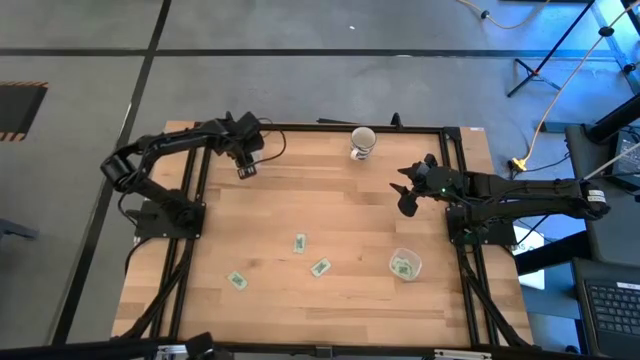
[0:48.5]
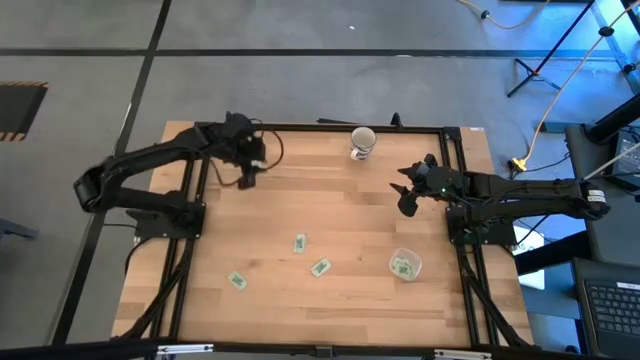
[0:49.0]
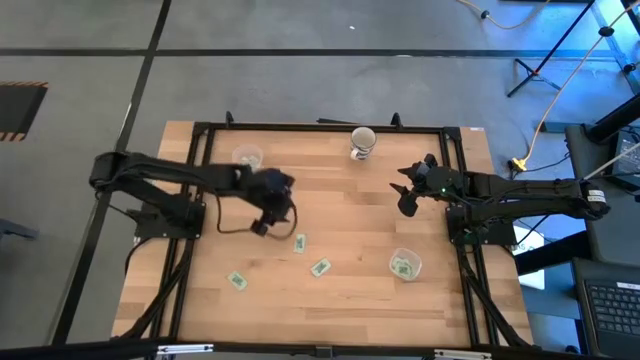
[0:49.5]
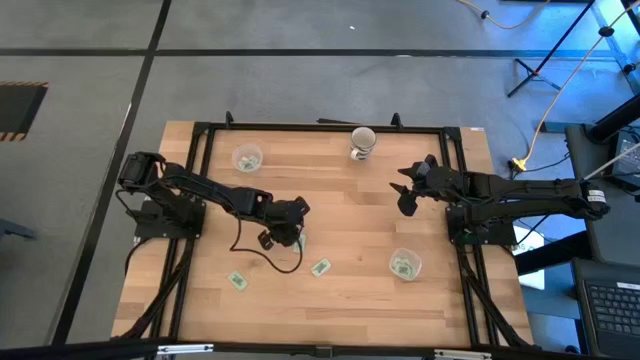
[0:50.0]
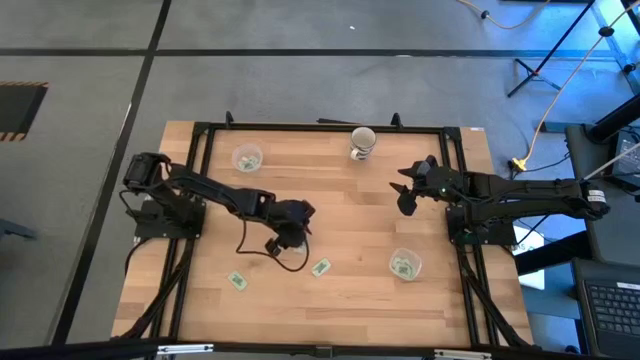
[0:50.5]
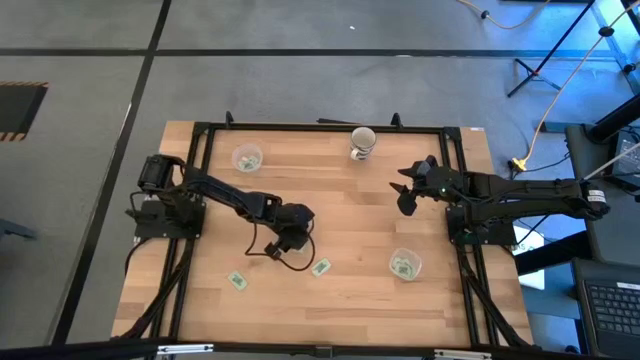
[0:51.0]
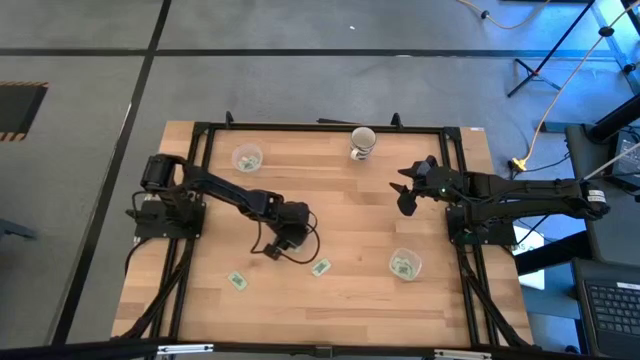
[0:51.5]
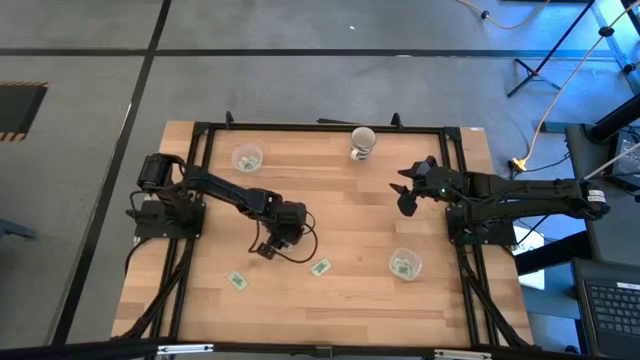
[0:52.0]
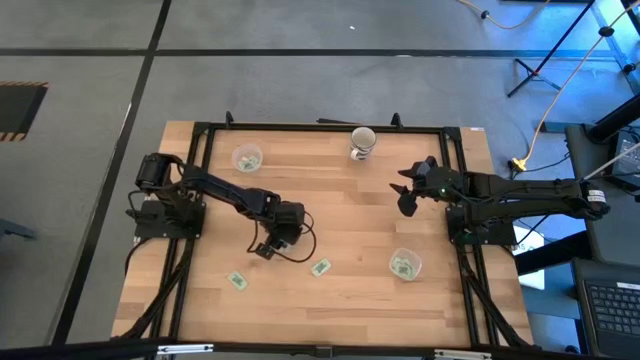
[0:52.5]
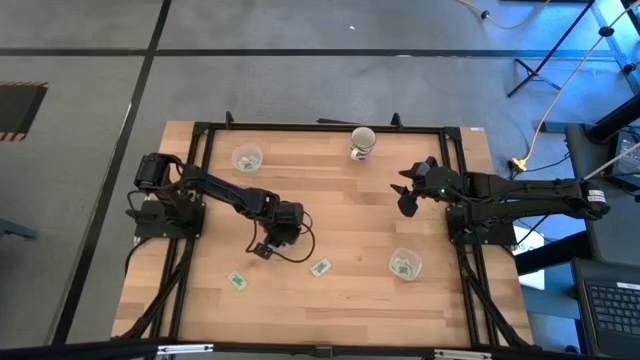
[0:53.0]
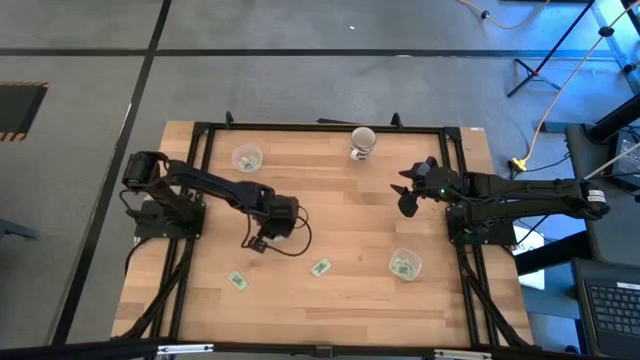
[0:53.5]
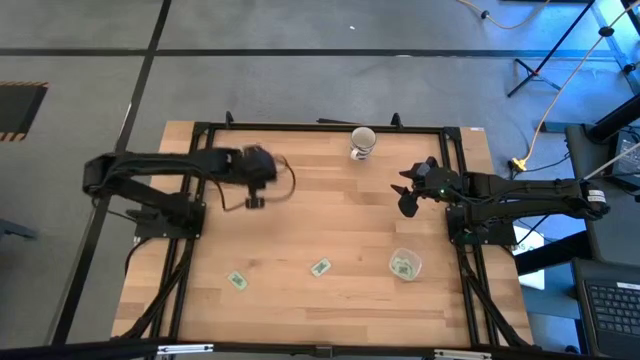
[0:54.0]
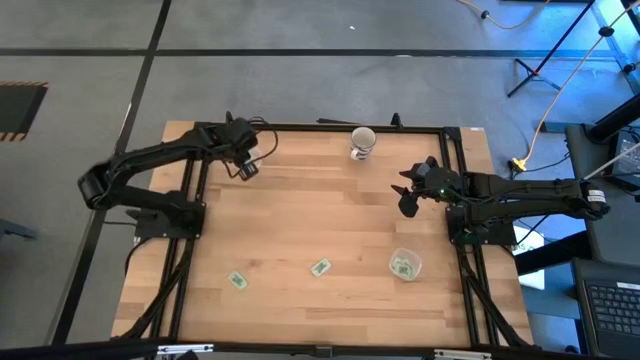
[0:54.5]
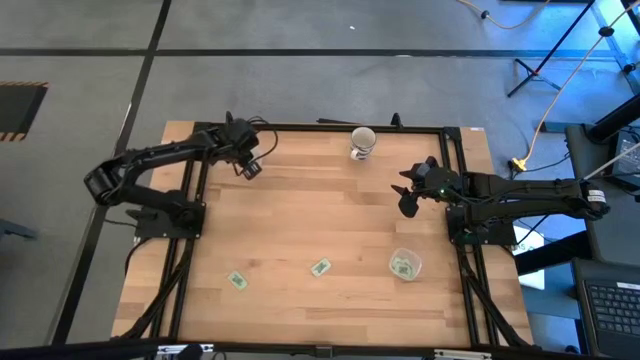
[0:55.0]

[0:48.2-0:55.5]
Task: Pick and place items into bin
Put the white stevia packet into the top transparent bin

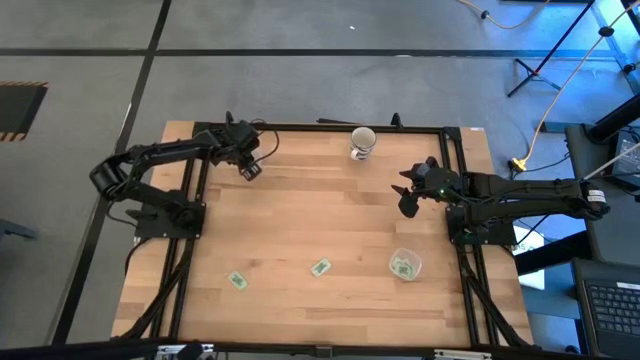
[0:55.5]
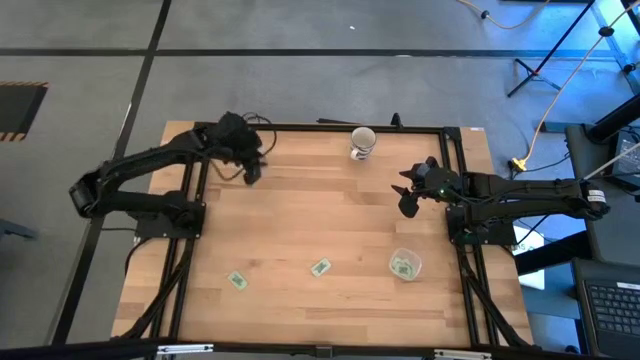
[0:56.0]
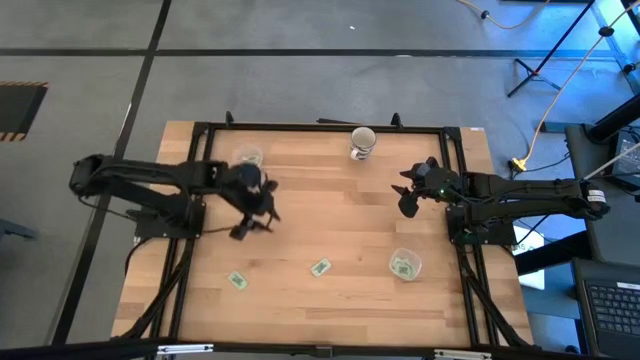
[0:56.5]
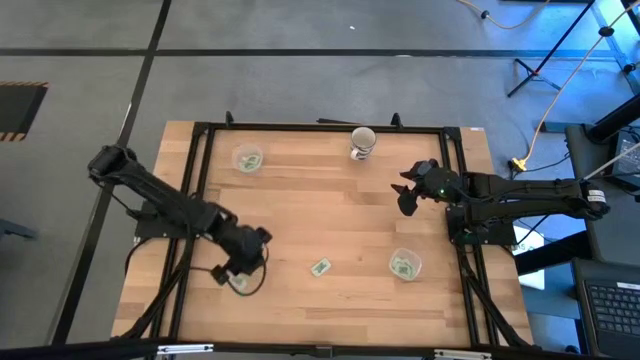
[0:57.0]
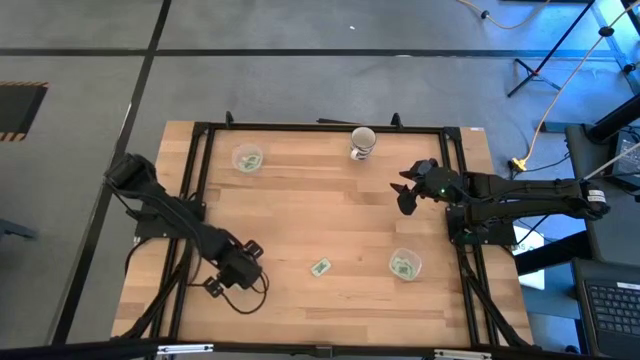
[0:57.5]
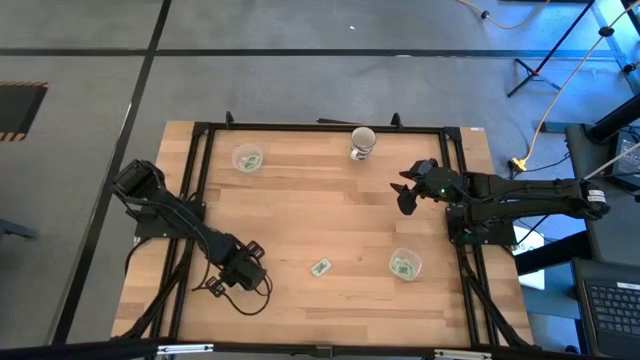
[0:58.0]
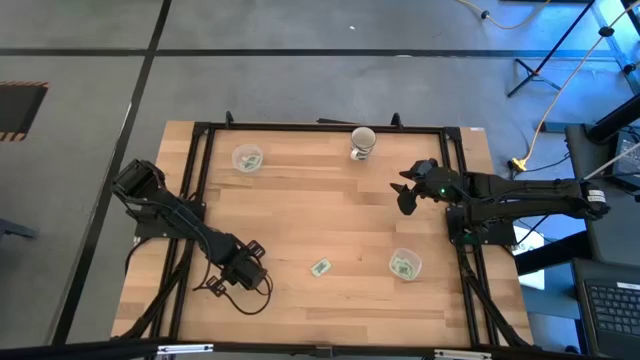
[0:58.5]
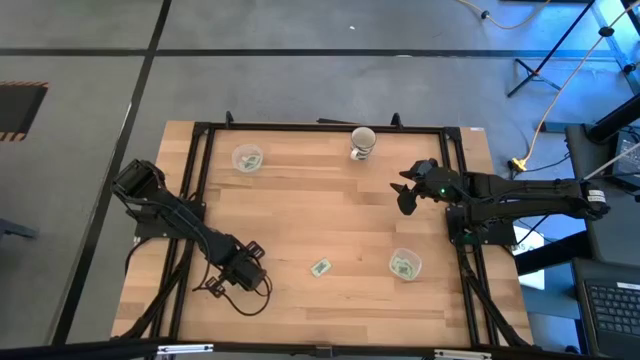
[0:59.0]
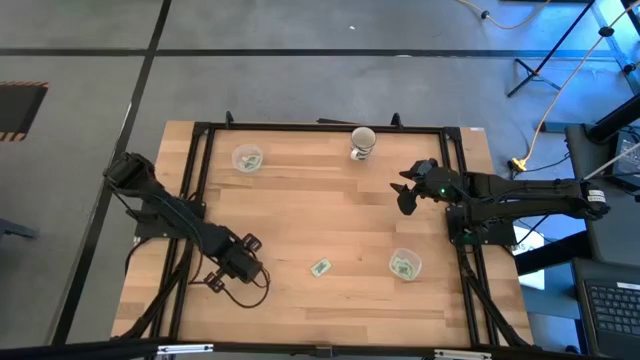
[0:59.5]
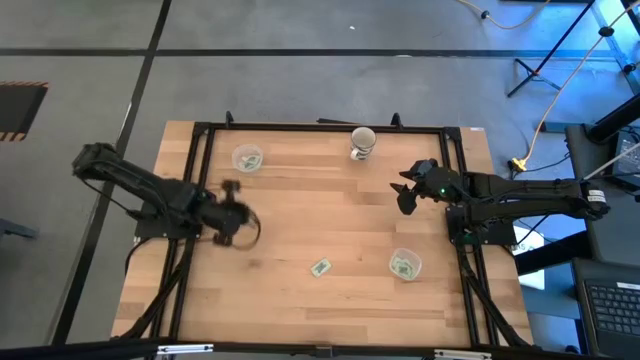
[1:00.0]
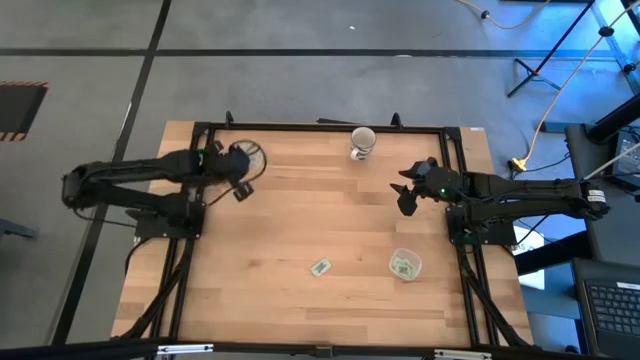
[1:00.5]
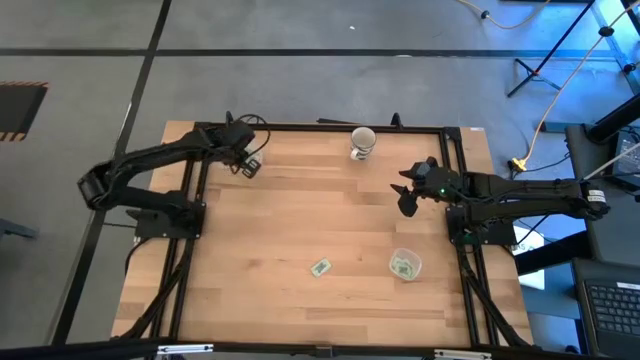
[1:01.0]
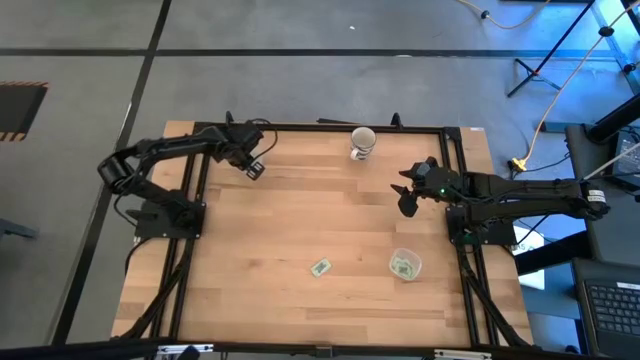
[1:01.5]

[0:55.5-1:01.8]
Put the white stevia packet into the top transparent bin

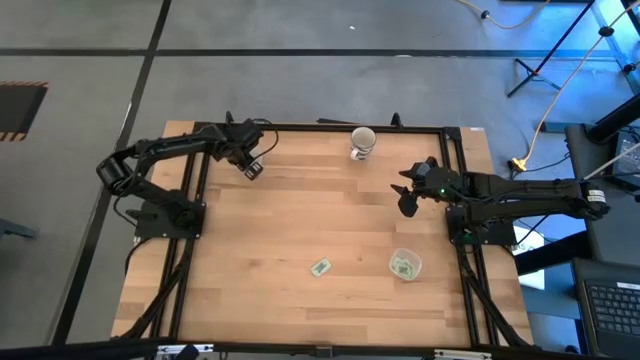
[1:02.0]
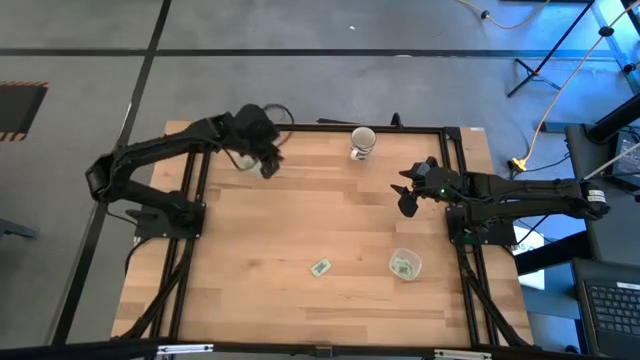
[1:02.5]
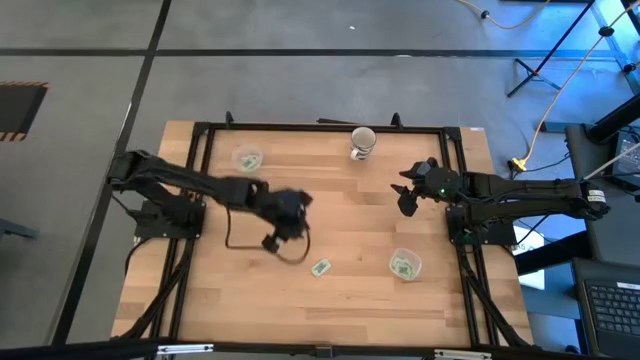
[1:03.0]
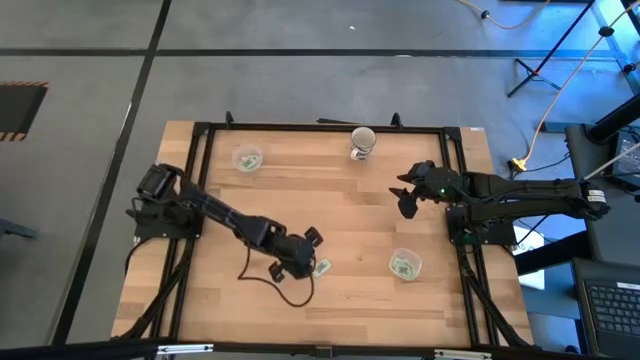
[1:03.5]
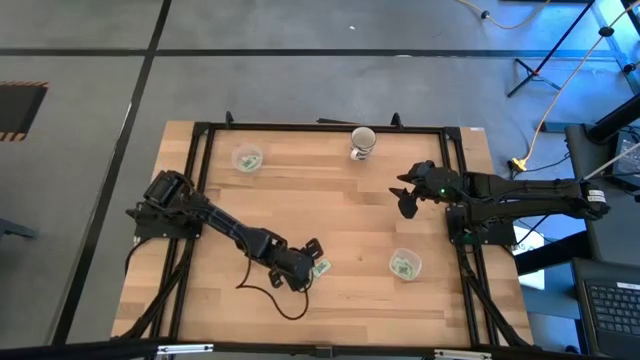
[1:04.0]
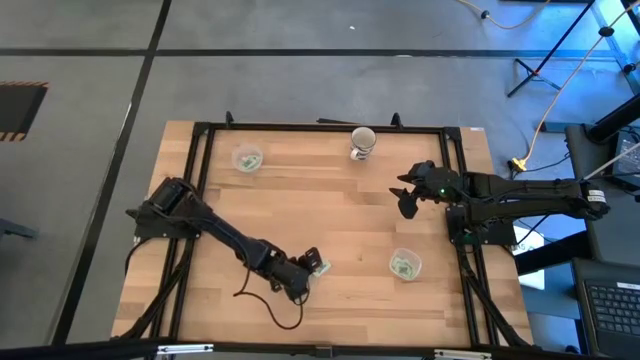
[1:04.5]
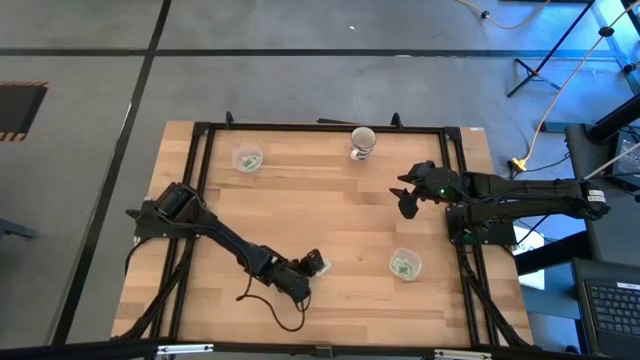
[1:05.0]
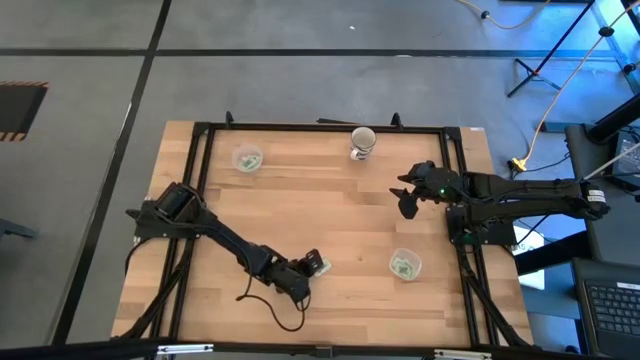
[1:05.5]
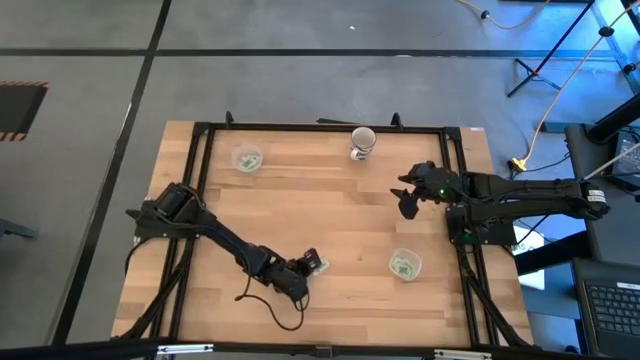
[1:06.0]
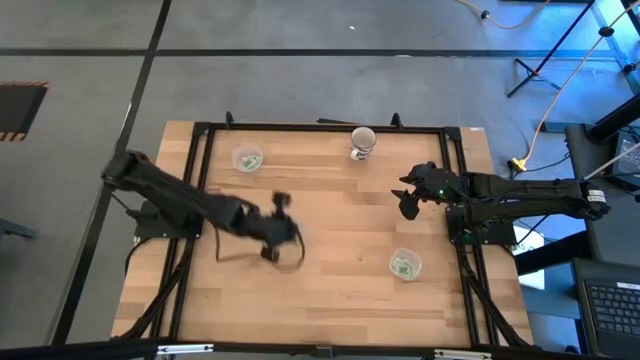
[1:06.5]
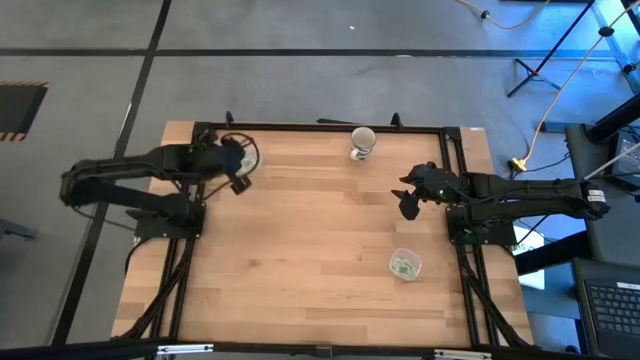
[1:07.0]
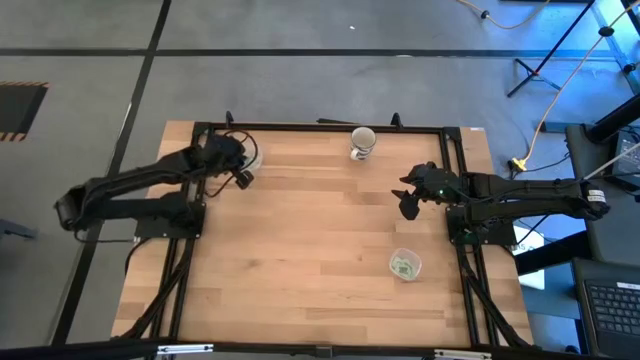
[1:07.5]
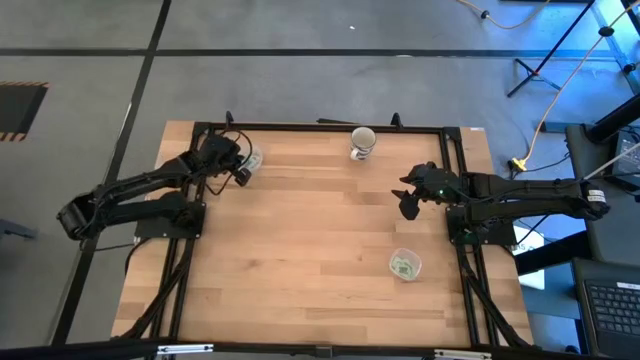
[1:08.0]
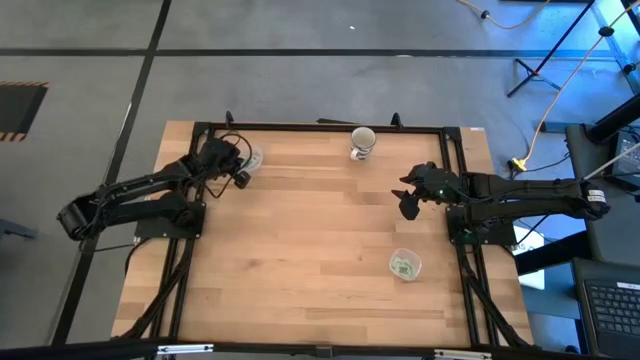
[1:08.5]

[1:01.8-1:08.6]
Put the white stevia packet into the top transparent bin
